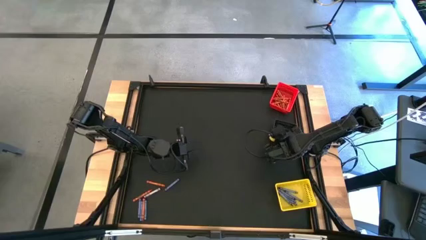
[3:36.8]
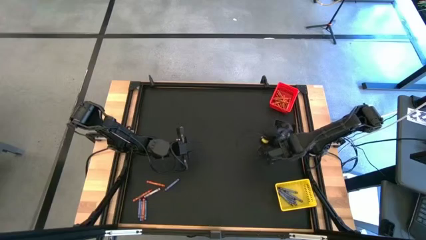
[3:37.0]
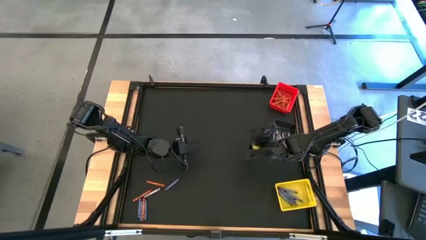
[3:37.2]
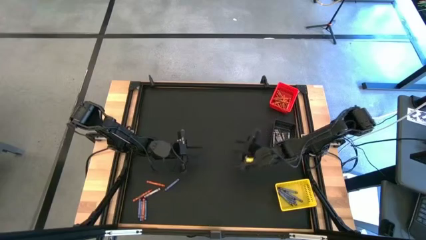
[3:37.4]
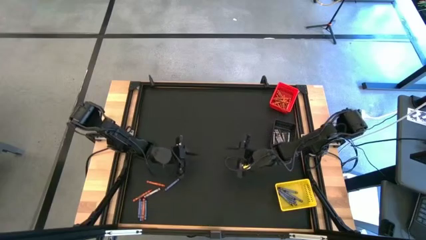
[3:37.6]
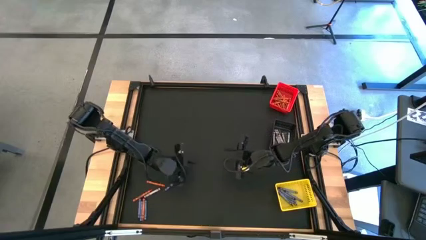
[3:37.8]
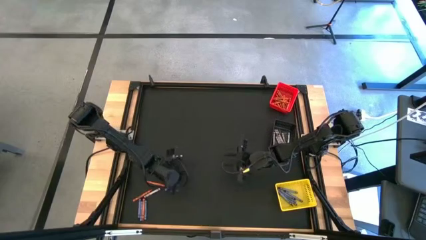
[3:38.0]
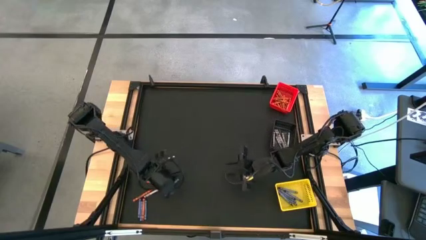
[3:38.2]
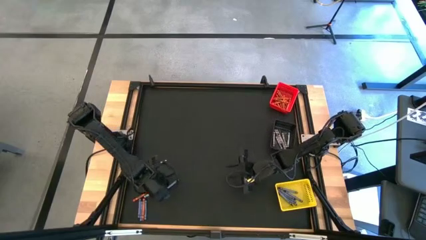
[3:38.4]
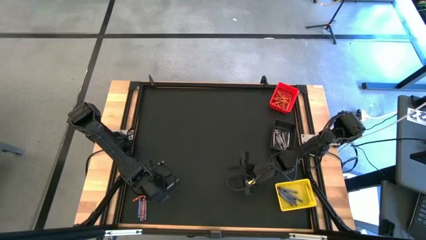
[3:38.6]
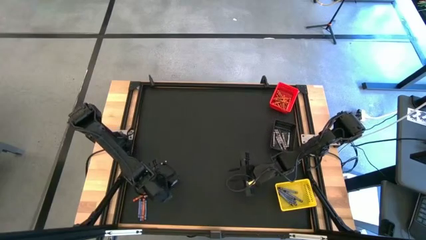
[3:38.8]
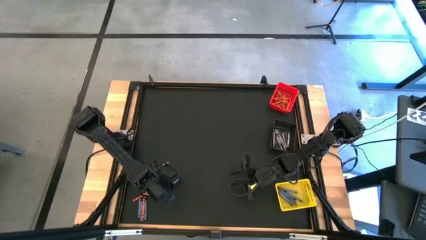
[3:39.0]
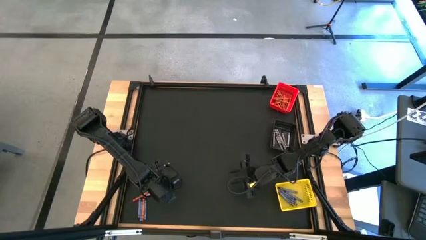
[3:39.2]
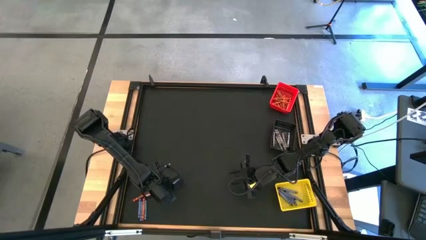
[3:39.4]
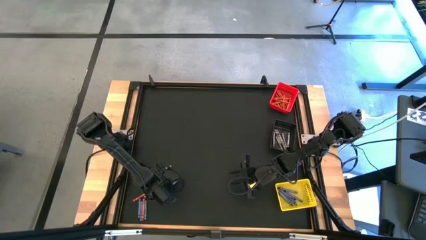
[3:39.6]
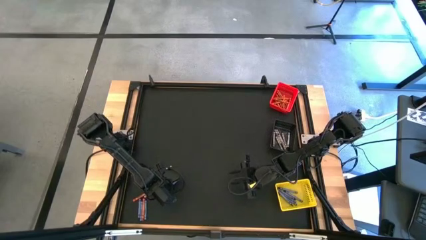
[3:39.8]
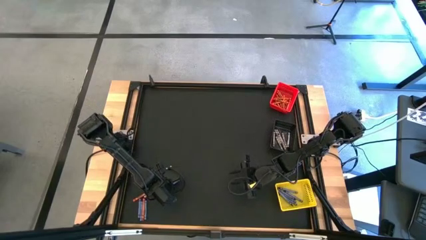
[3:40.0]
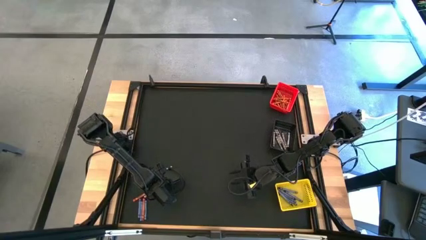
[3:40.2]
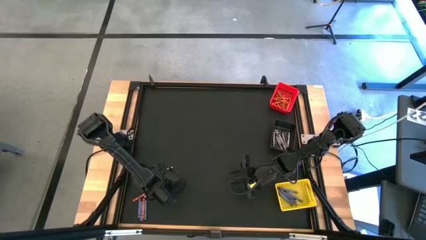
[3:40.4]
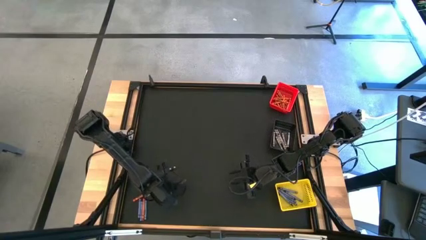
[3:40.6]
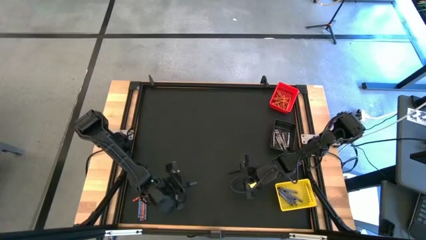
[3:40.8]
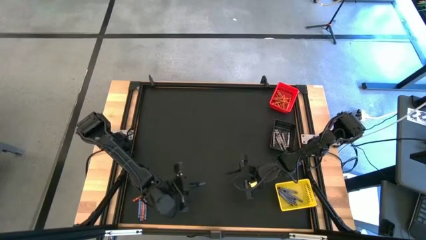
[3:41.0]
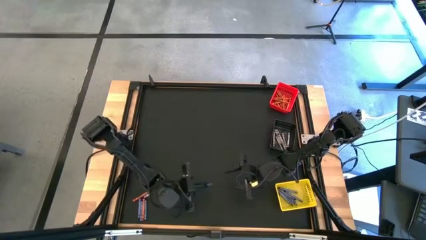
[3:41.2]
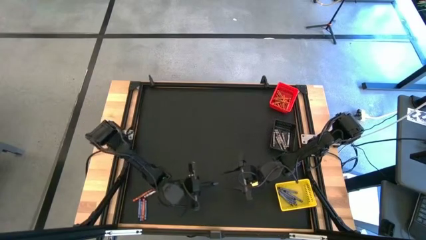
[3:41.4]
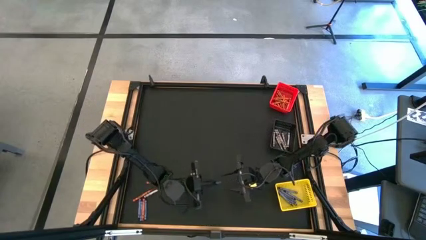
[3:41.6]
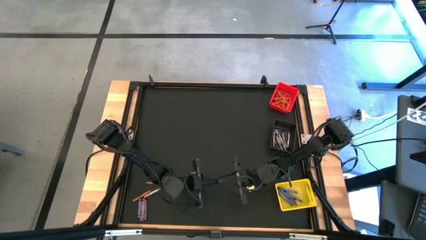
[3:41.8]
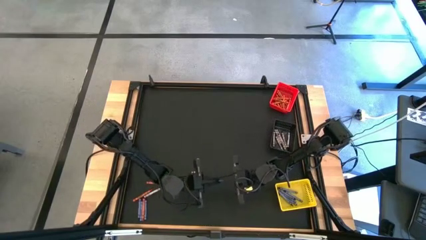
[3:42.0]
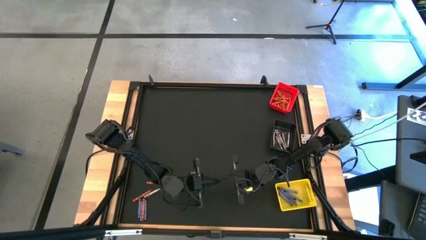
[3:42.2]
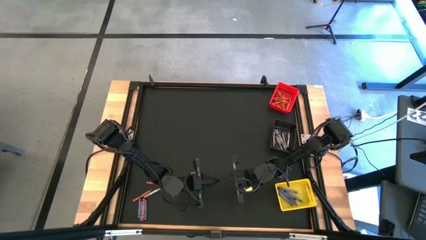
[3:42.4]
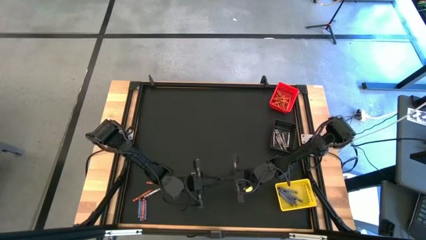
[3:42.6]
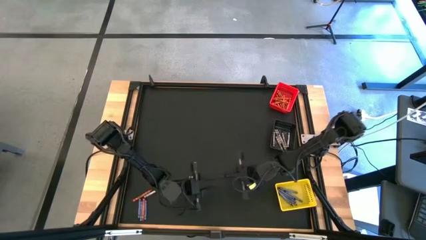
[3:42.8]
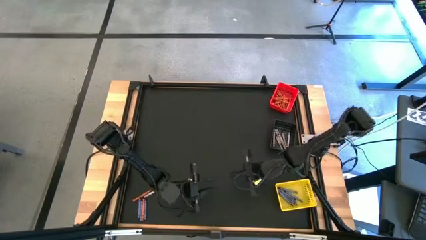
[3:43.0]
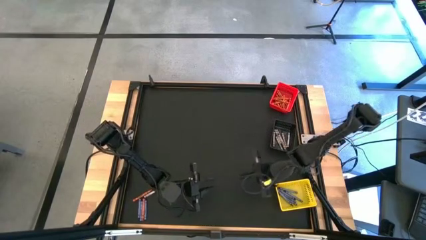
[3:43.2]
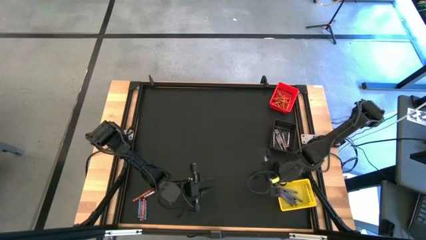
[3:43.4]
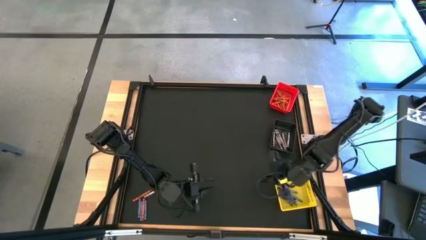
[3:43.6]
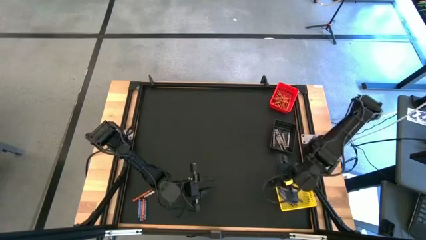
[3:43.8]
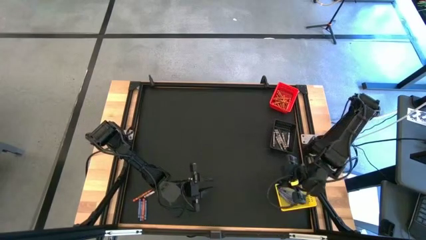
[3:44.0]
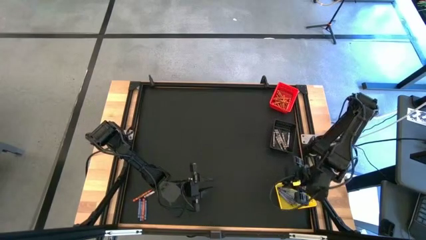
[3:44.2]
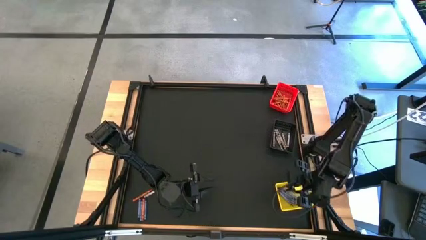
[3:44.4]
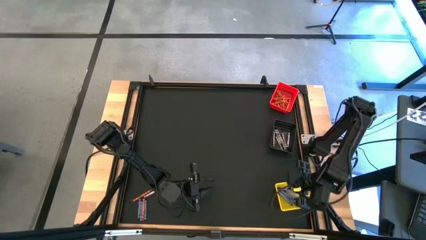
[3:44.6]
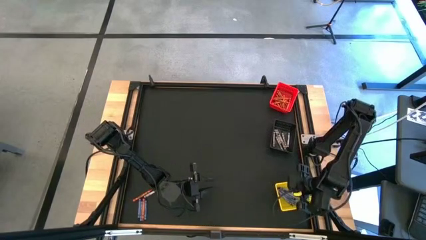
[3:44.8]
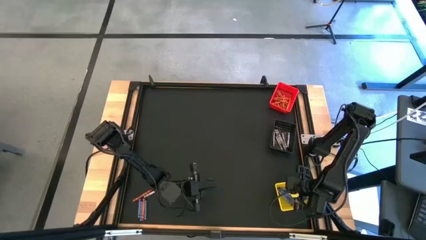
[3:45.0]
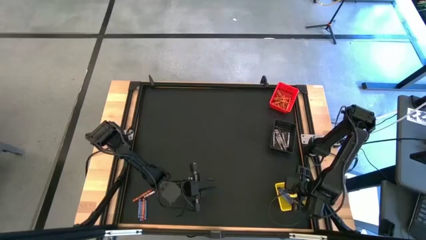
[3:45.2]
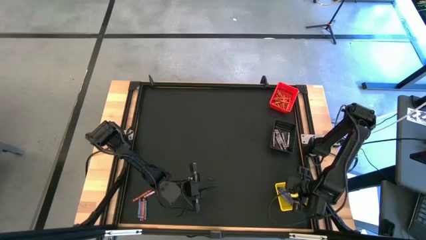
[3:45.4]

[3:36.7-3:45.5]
Task: Sort crayons
Put the blue crayon into the yellow bin

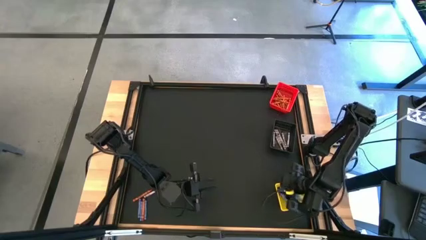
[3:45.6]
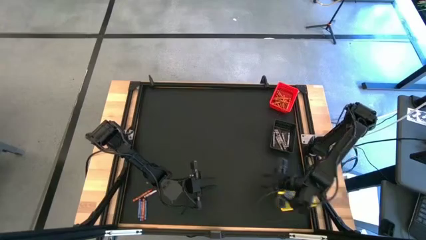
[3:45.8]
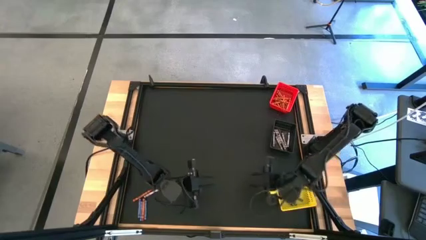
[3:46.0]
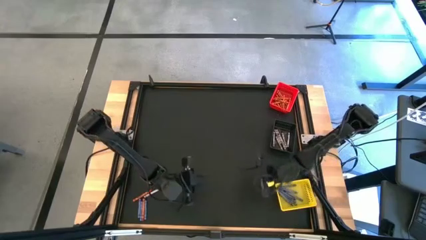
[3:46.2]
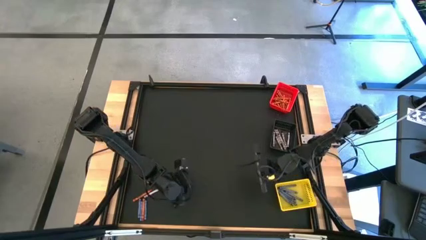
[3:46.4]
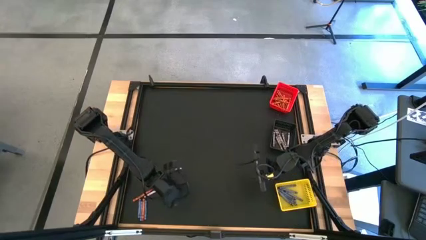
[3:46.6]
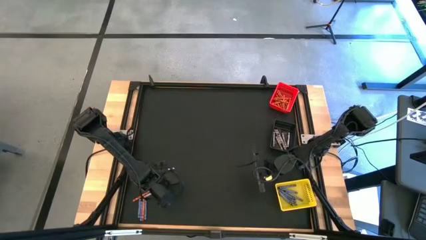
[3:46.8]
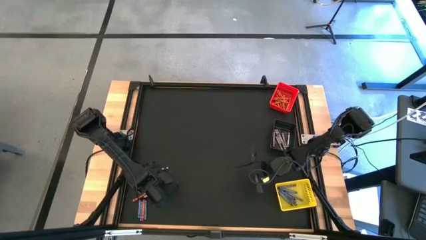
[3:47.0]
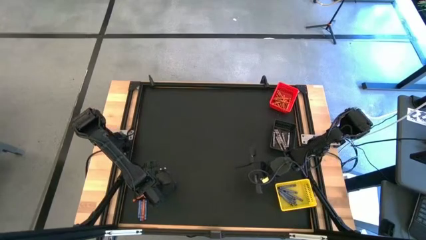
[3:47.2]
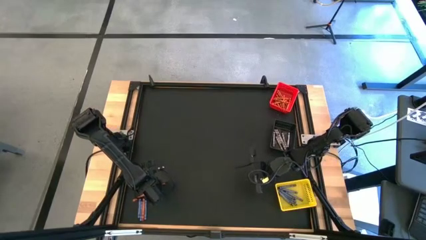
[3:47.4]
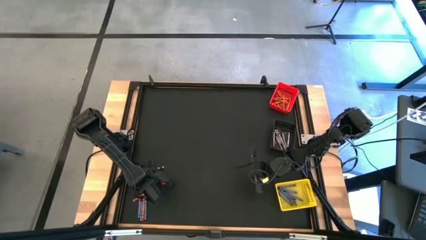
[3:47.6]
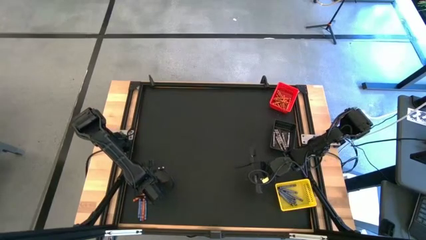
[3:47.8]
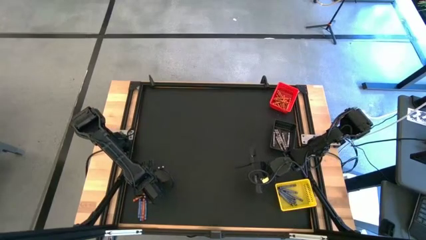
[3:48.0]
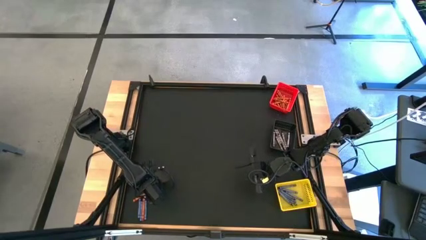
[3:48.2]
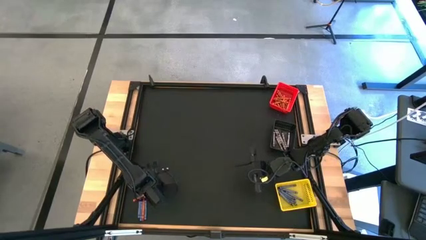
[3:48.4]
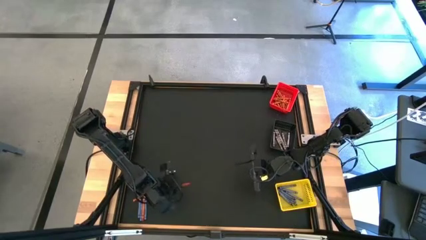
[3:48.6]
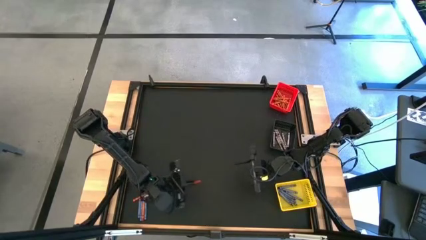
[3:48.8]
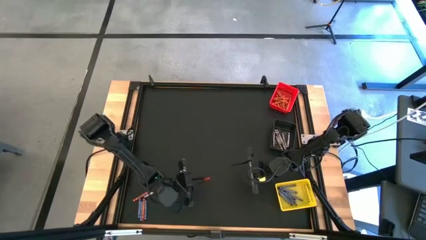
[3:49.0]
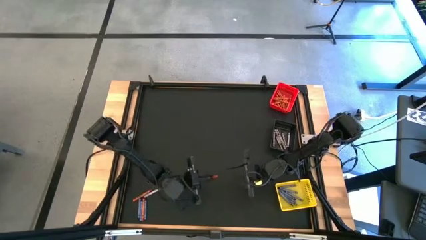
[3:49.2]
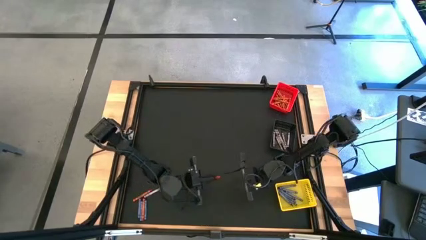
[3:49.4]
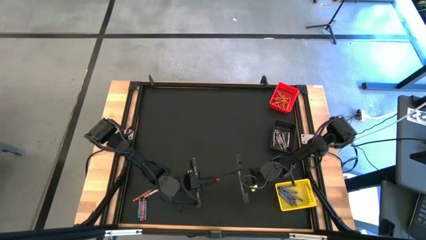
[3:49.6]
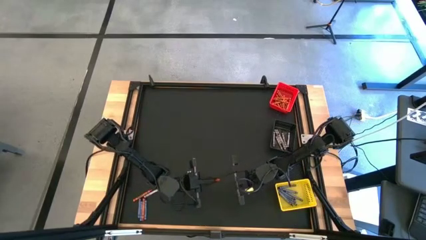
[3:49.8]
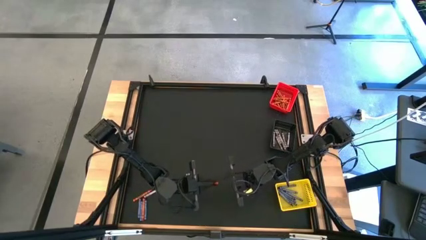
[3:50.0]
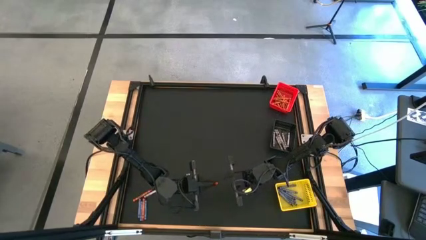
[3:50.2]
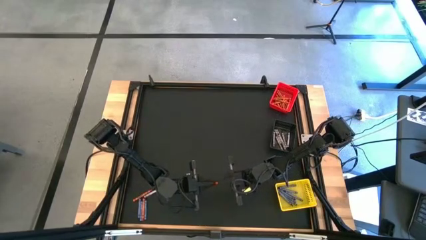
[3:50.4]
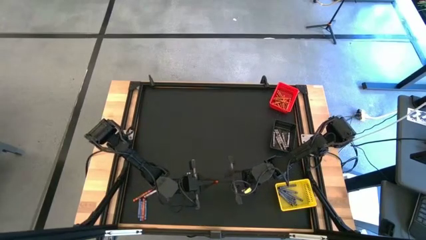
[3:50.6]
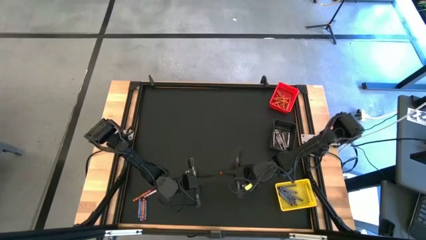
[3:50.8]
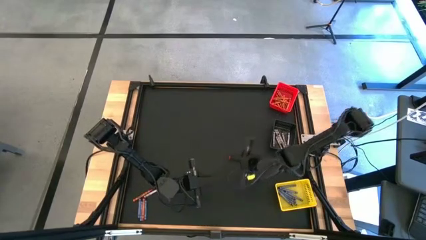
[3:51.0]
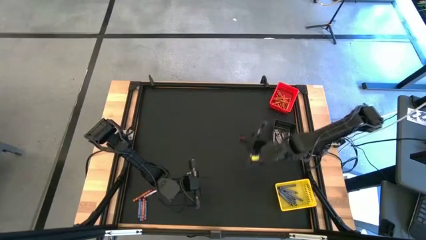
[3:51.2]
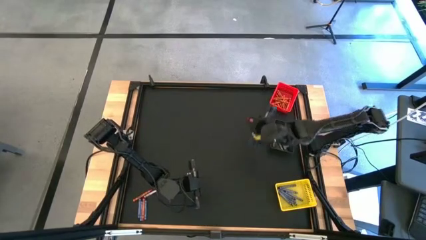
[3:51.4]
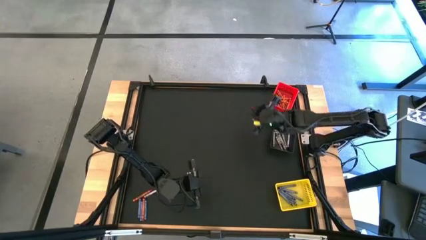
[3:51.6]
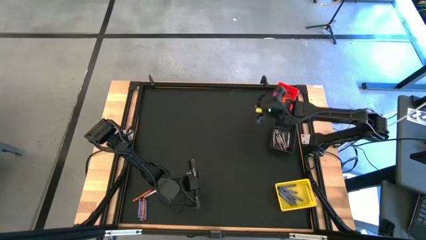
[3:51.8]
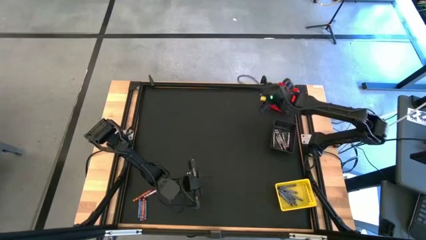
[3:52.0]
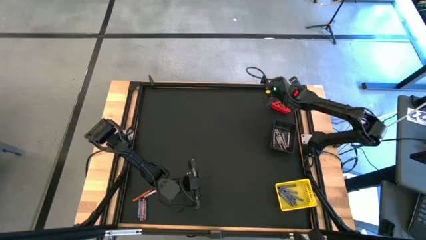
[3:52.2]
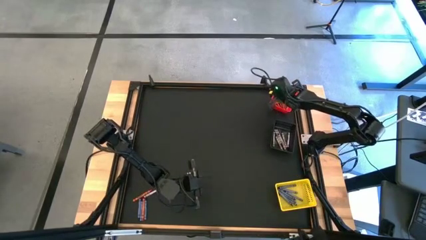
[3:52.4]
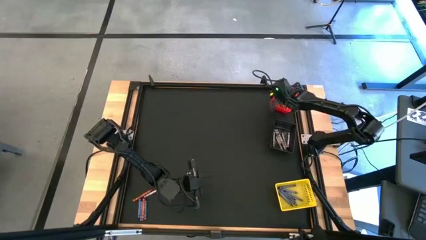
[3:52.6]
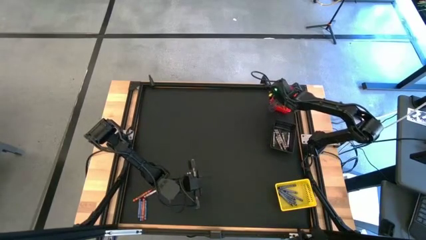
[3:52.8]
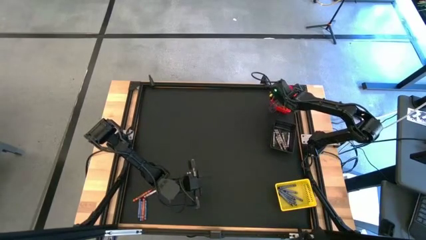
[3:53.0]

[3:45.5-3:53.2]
Put the orange crayon into the red bin
